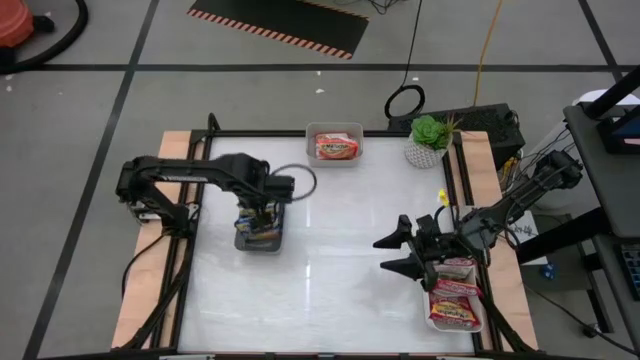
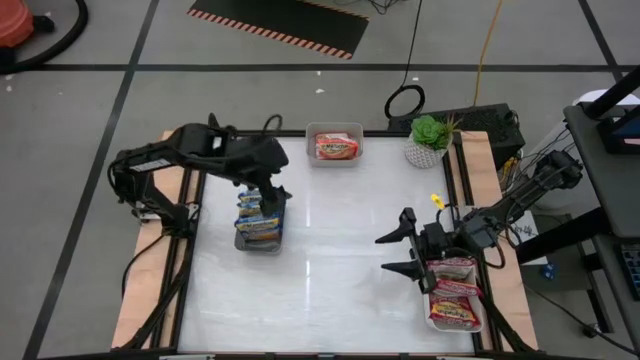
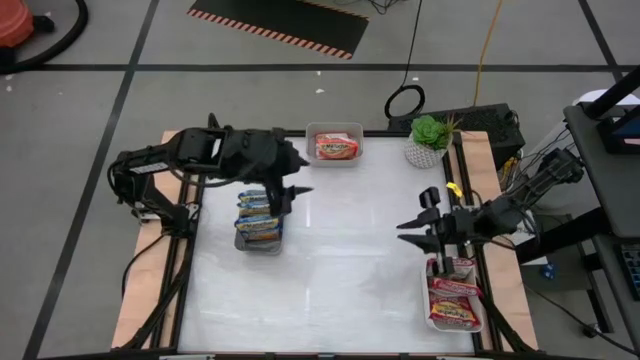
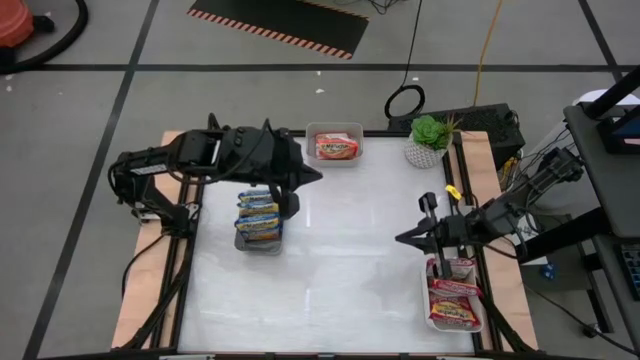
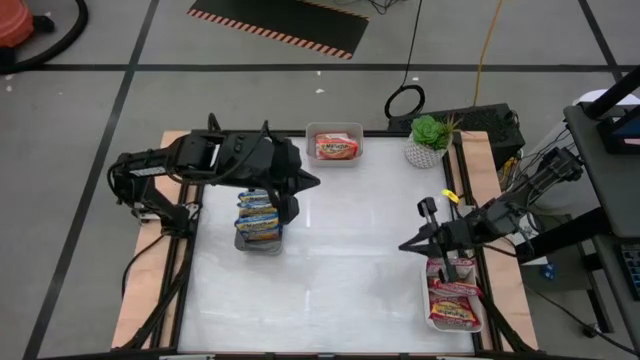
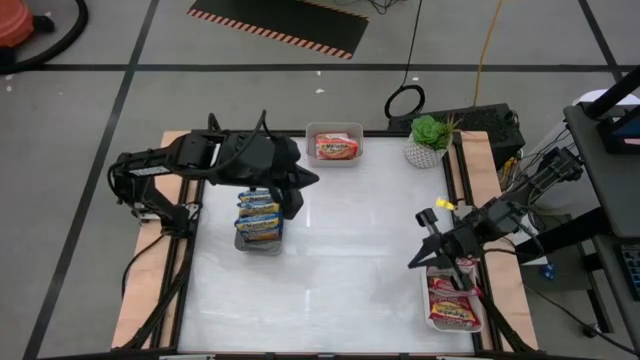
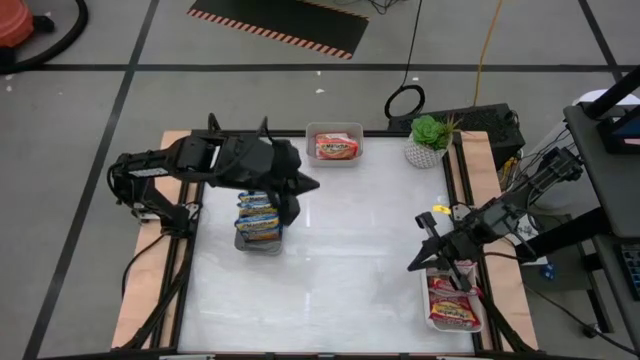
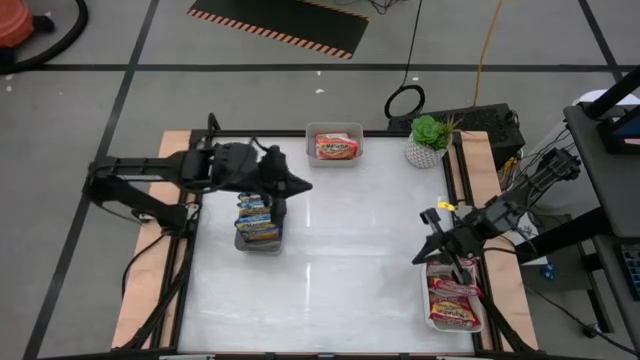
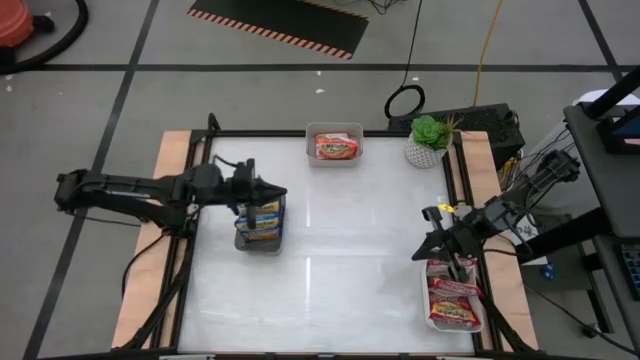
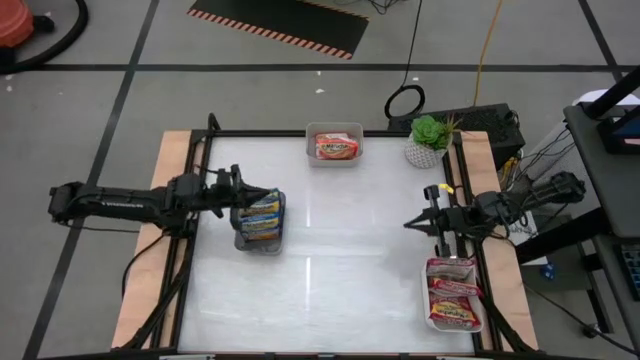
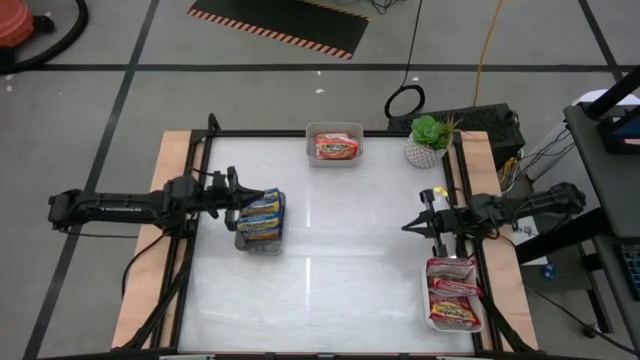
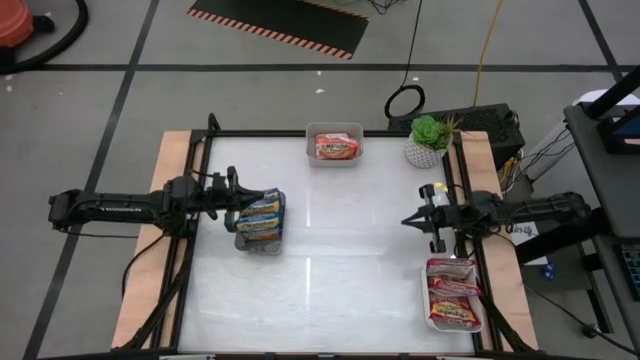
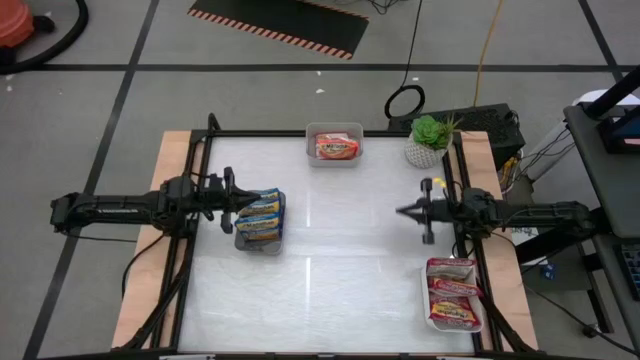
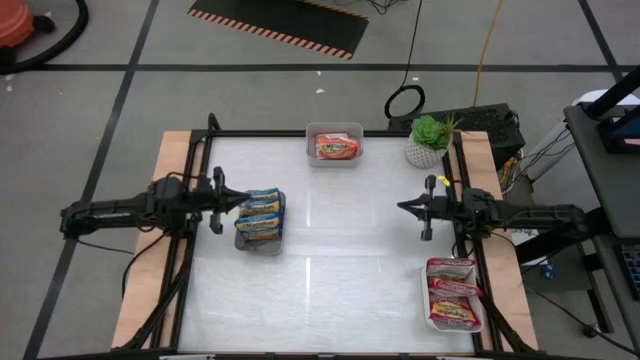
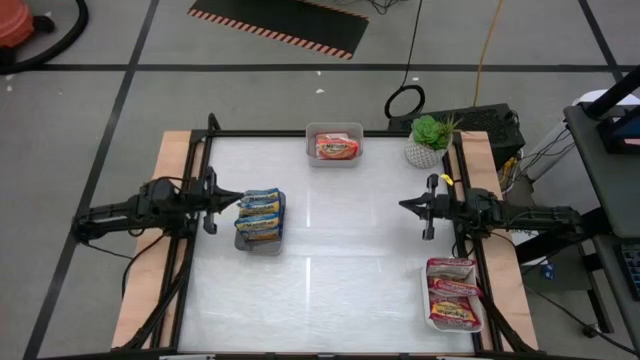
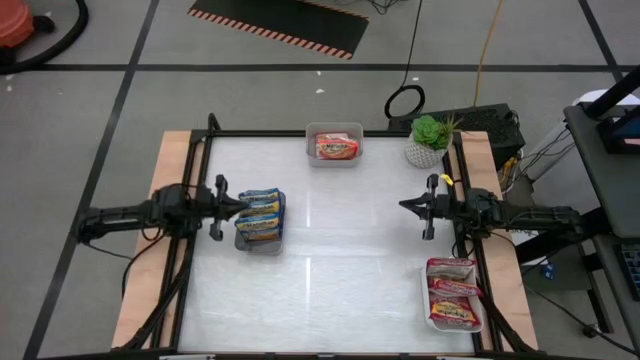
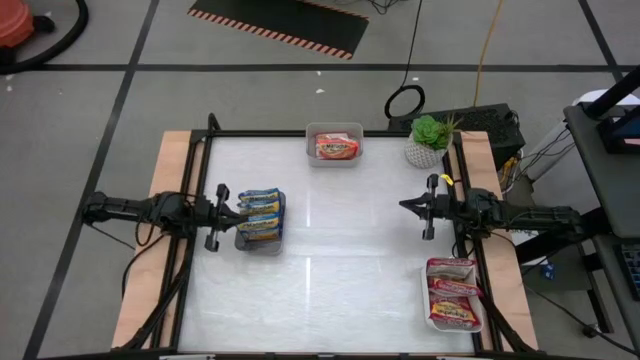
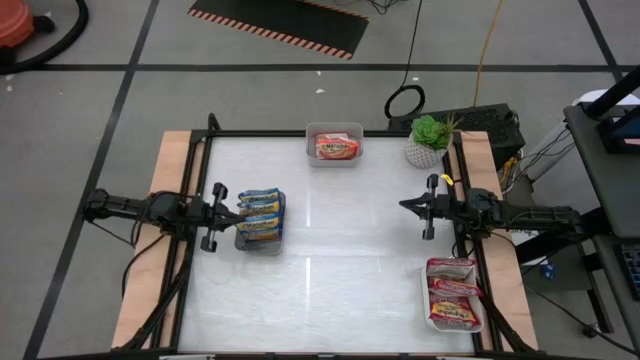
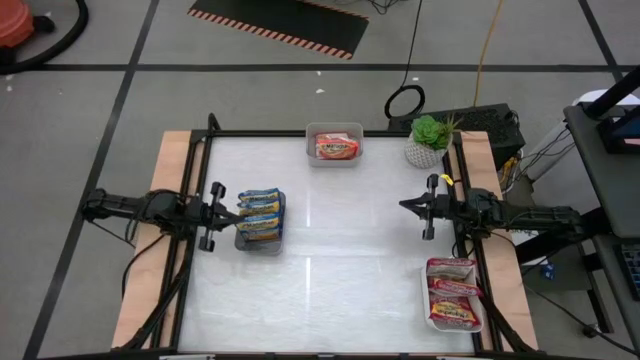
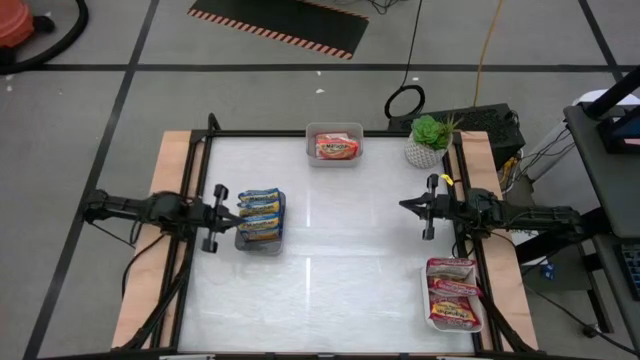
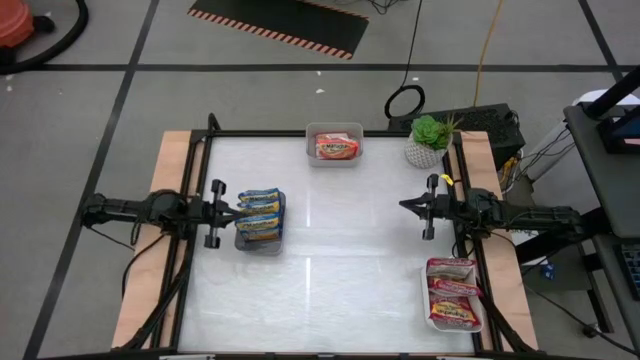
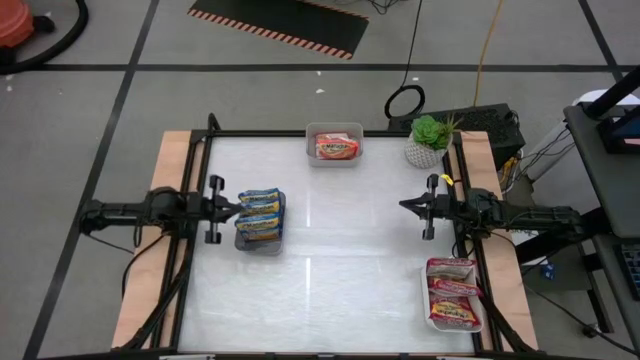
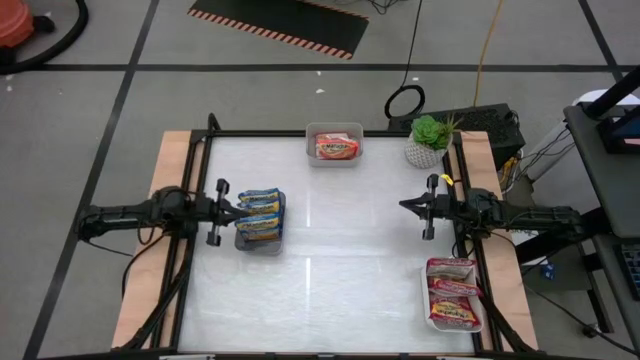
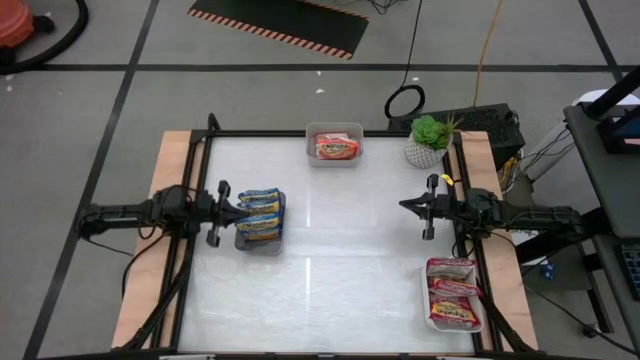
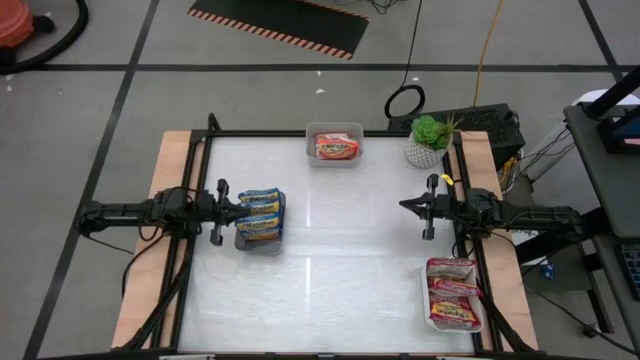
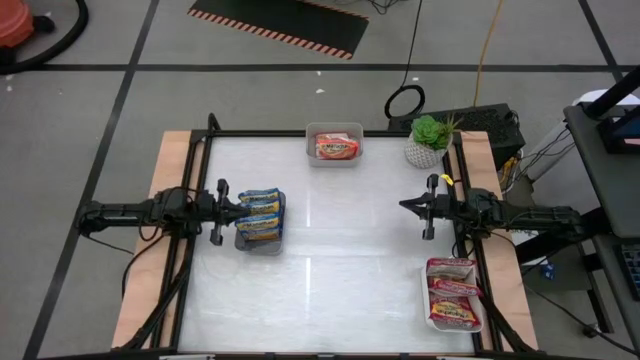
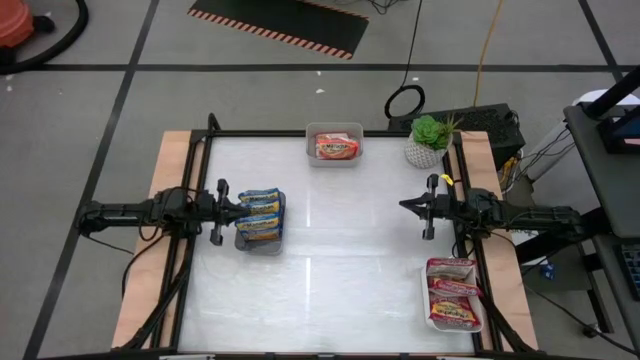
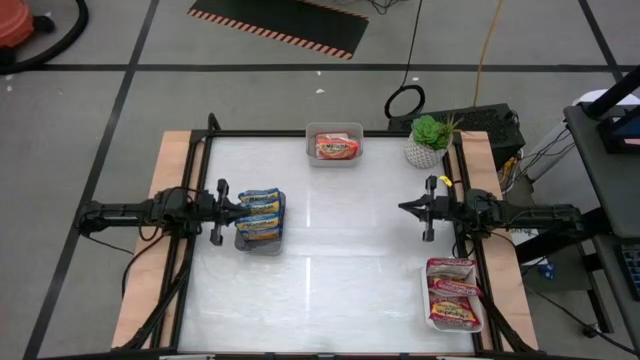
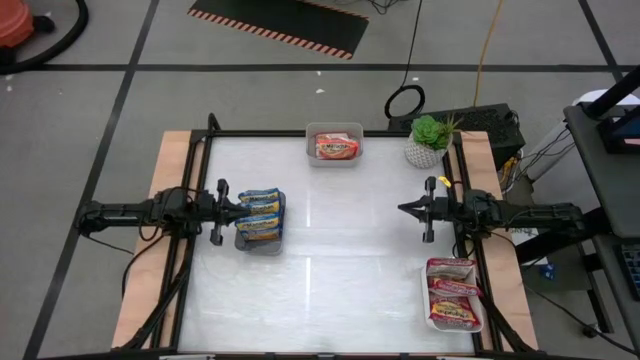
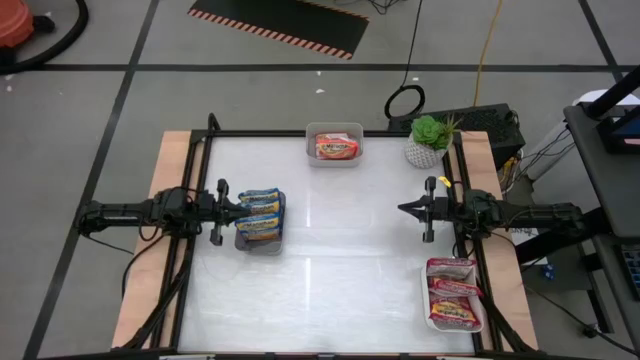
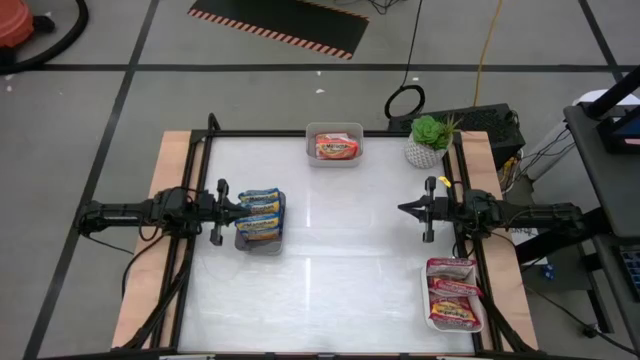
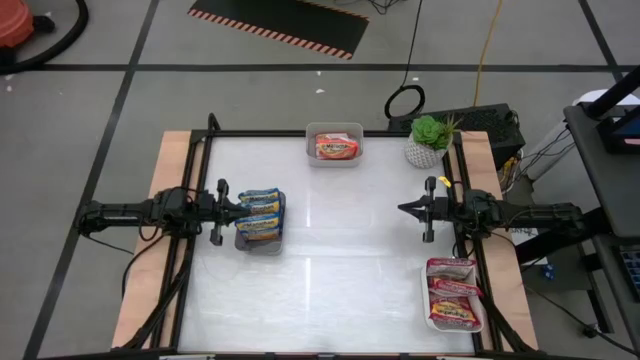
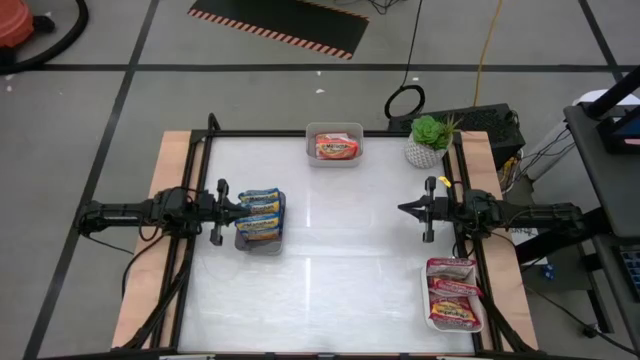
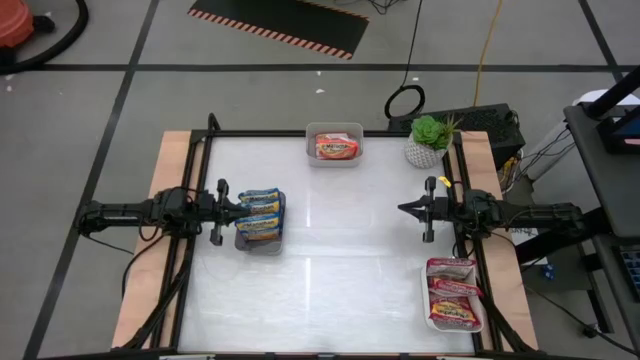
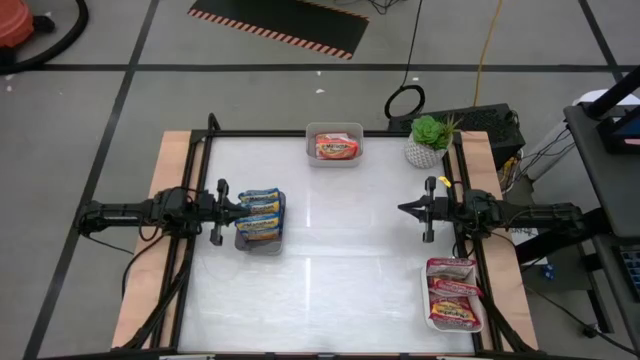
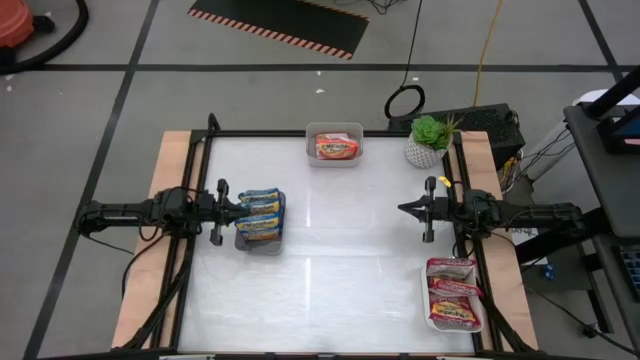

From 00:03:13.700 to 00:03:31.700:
Task: Sort Maruchan noodles
Return to Home Position

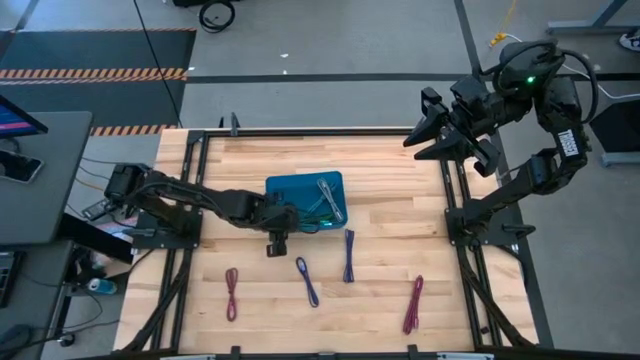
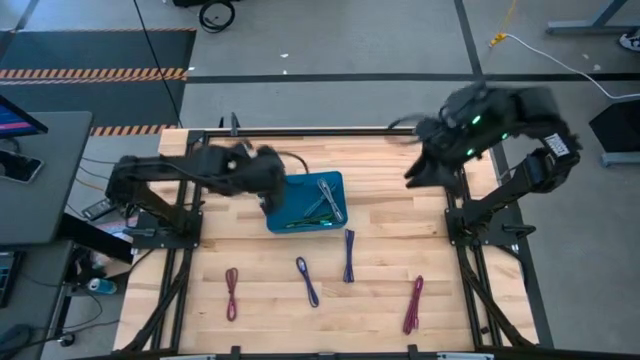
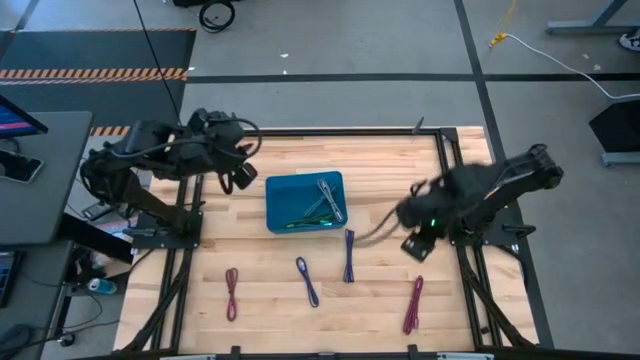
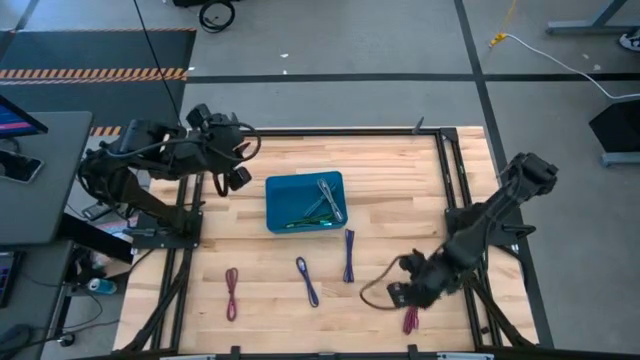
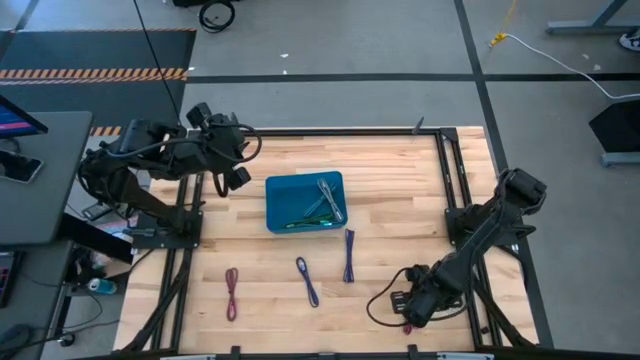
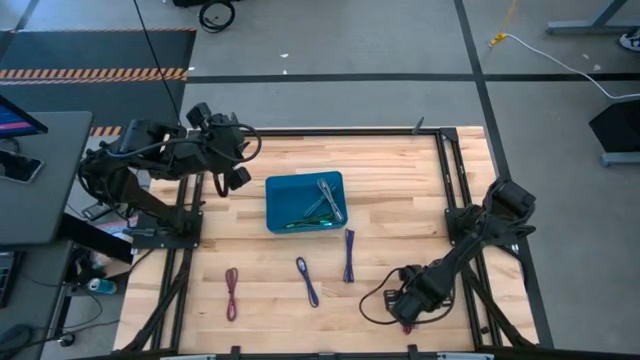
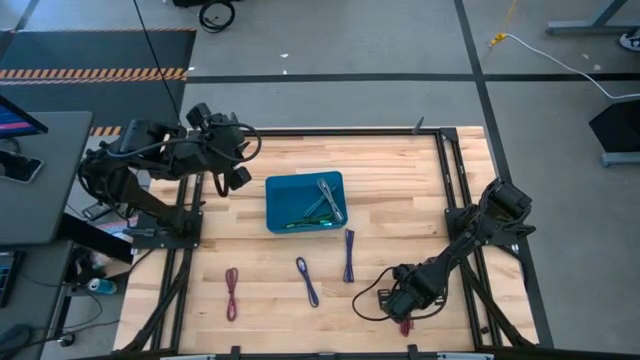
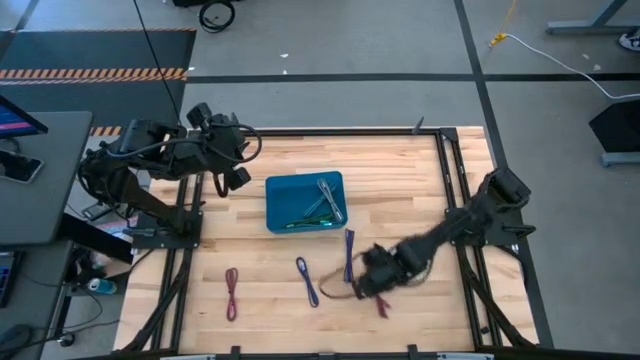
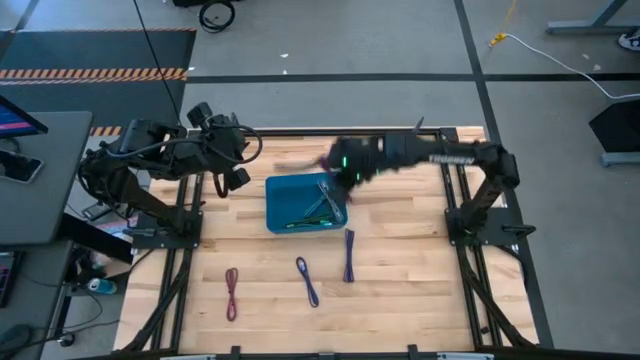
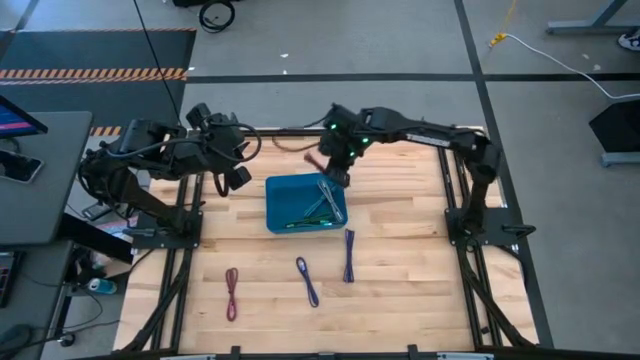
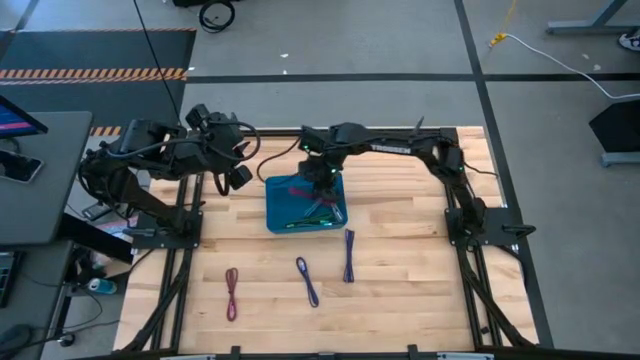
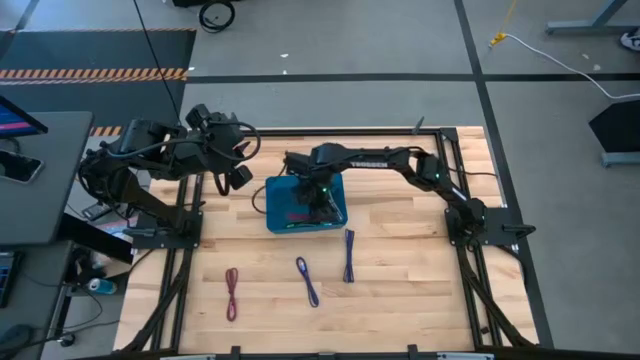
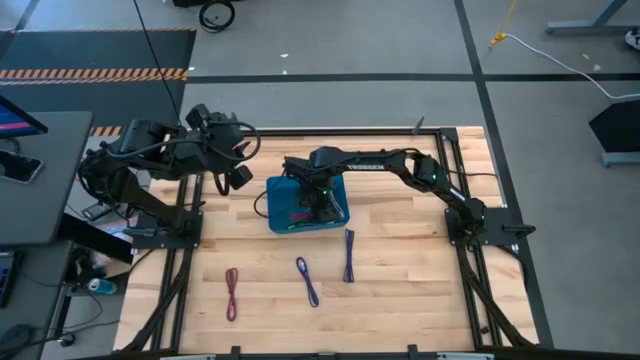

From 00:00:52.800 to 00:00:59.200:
Task: Pick and place USB-C Cables
Put the right black pink charger cable into the blue bin
